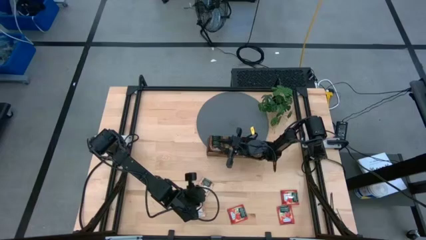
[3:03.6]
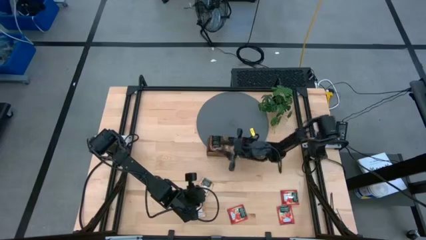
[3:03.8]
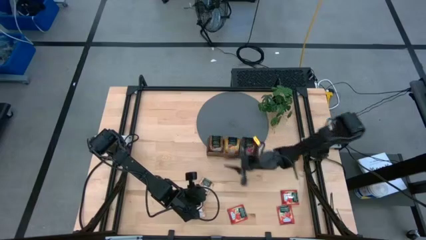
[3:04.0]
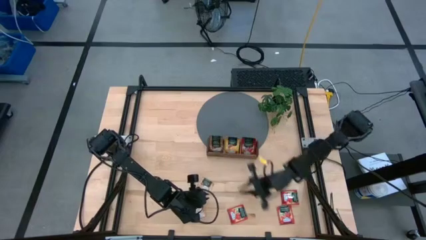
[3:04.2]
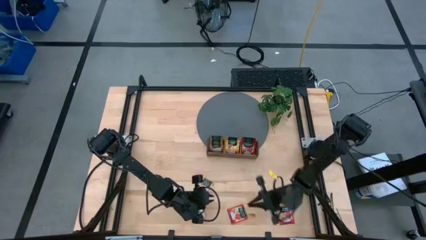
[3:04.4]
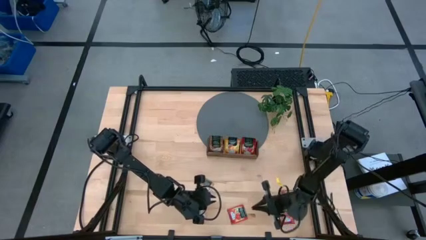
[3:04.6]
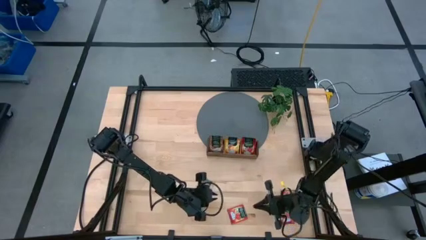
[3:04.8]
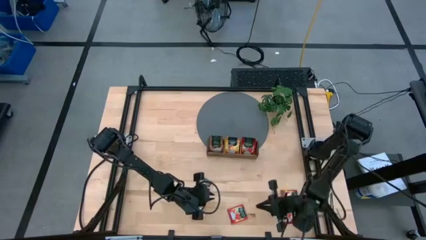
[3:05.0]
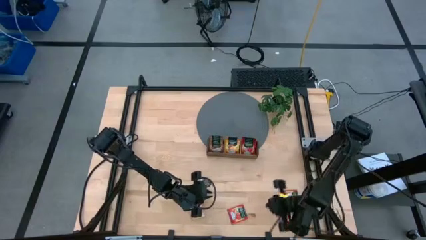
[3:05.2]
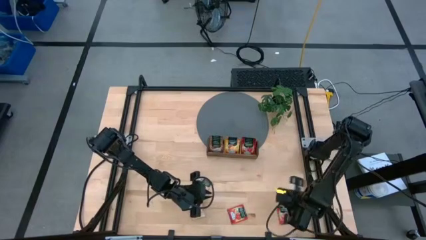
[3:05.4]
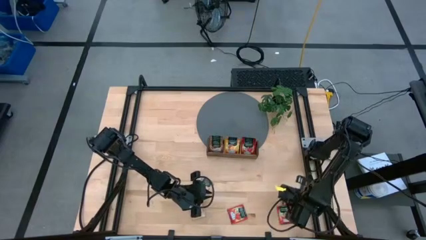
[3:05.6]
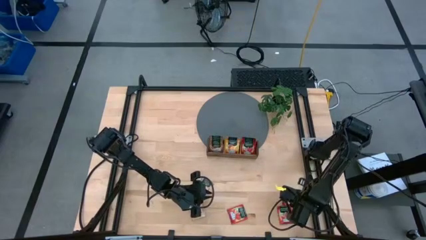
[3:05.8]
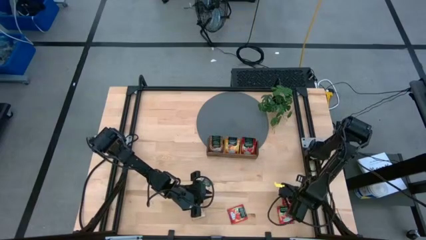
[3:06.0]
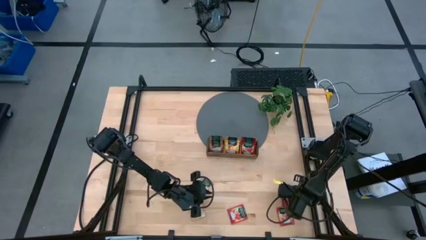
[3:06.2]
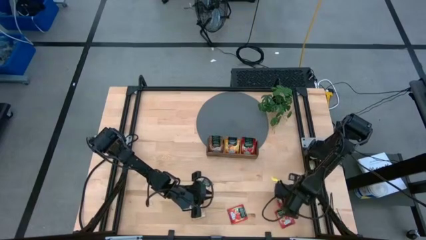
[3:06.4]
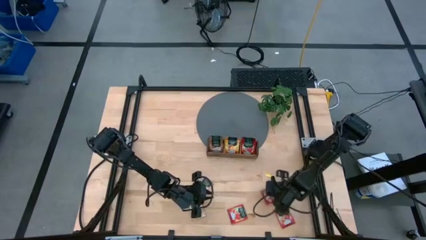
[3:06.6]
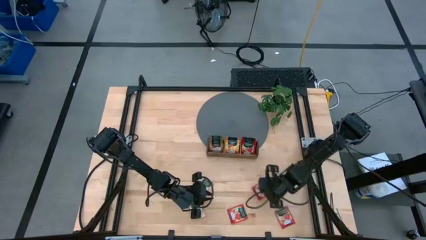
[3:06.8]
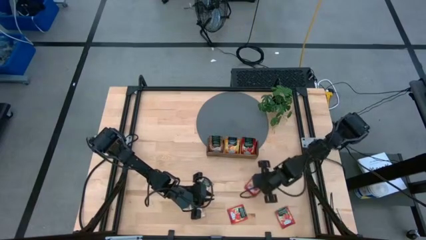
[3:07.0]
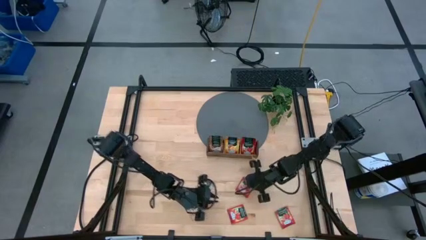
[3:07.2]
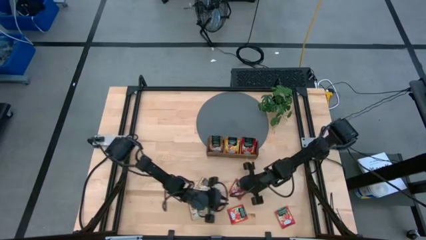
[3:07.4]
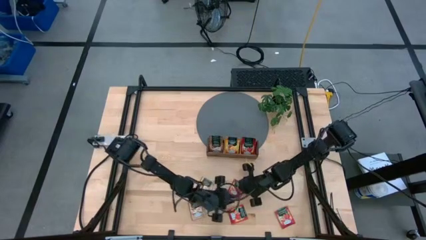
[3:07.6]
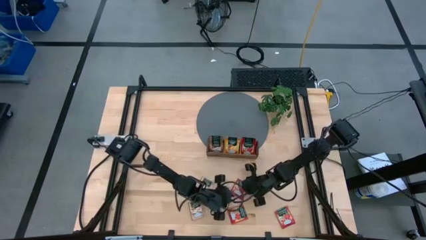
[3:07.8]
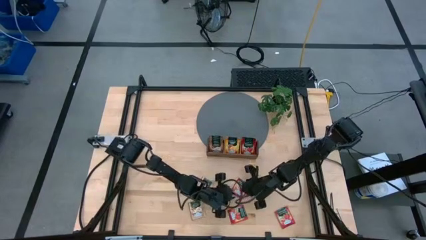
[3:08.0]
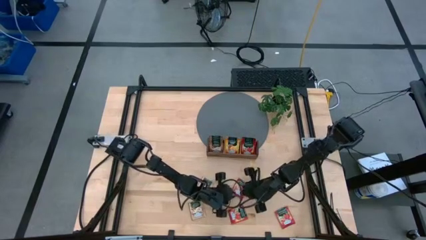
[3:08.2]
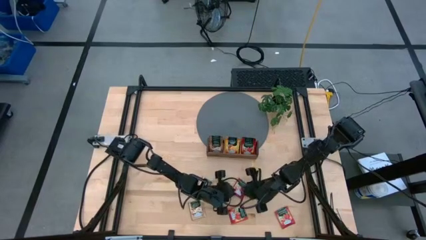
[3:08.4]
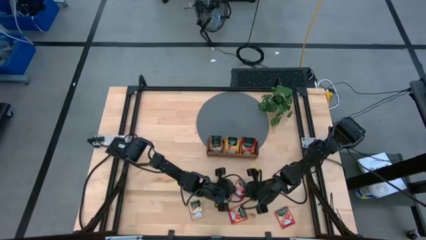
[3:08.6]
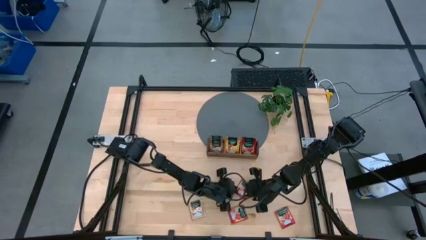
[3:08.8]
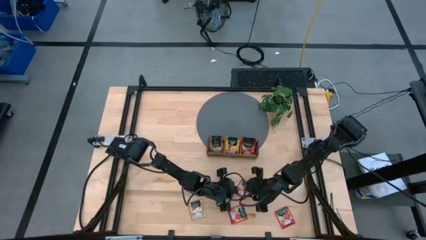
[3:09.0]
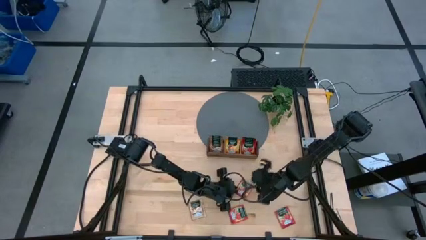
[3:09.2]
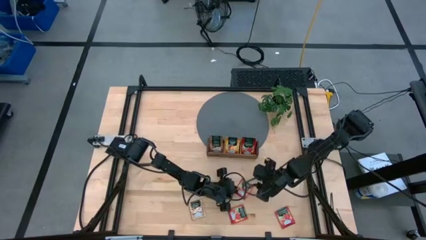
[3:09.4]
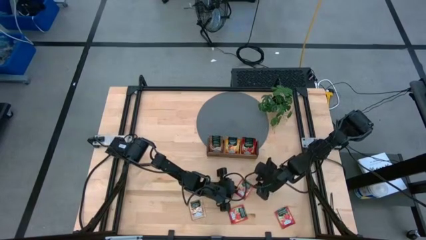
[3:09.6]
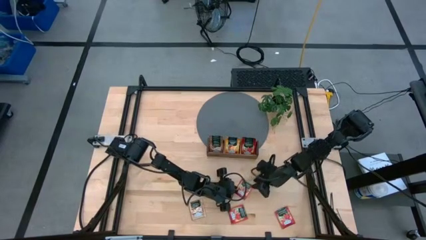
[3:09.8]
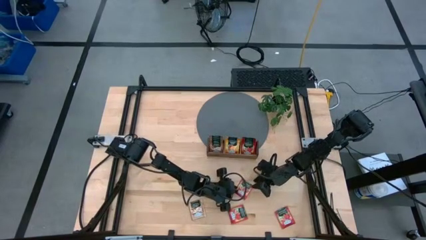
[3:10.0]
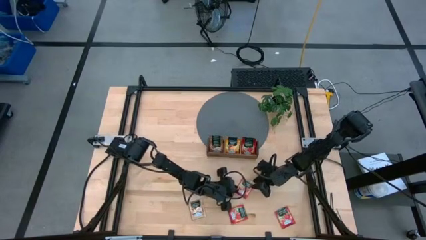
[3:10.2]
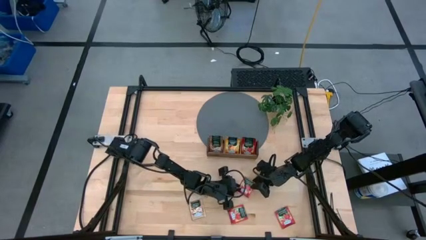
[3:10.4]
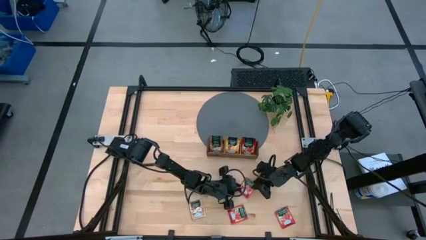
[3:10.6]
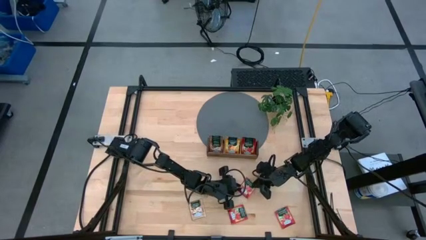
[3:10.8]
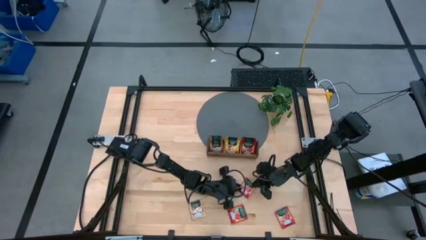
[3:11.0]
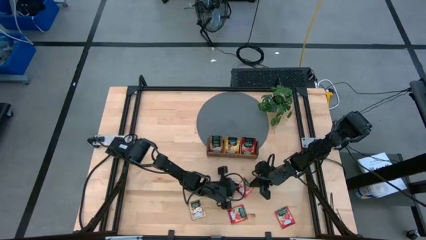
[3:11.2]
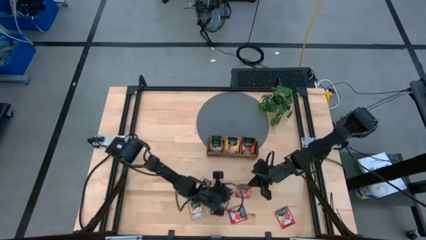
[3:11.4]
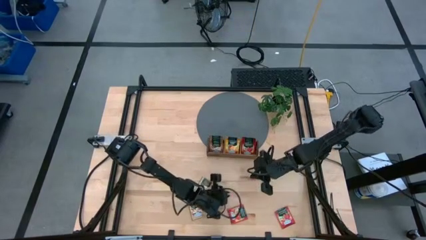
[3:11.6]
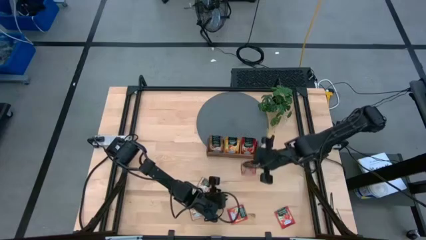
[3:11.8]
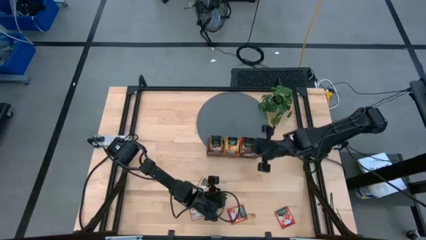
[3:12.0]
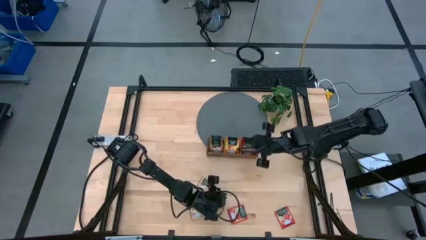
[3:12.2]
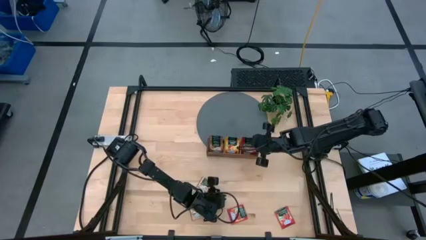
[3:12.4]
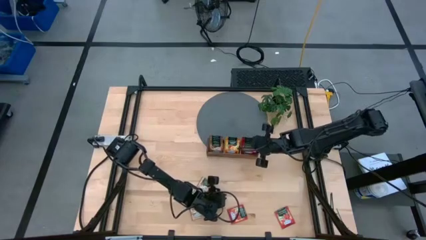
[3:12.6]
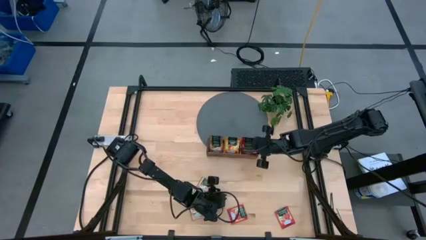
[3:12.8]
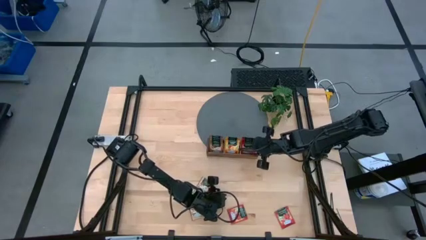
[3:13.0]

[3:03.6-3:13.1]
Task: Pick & Place Tea
Put the top red tea bag into the right wooden organizer
